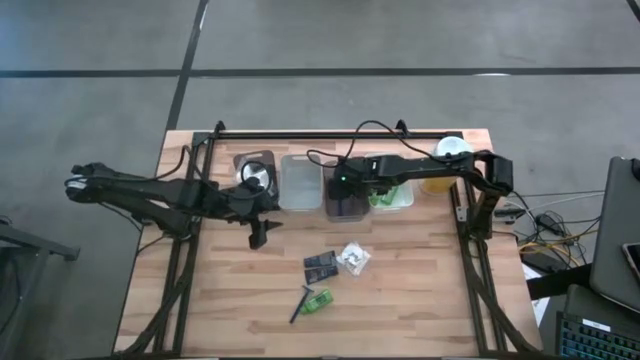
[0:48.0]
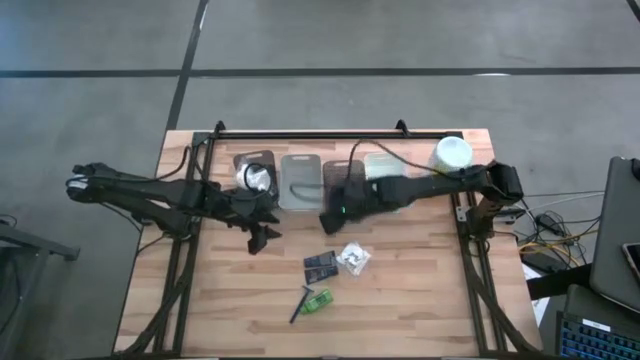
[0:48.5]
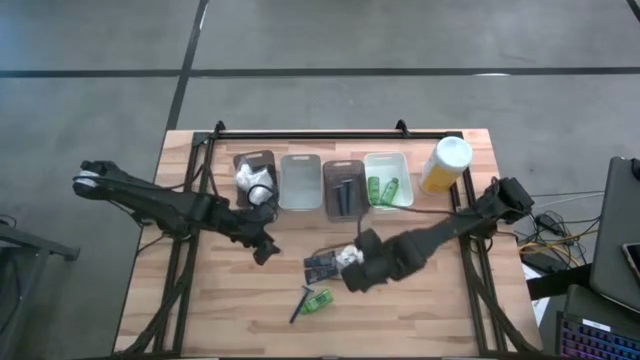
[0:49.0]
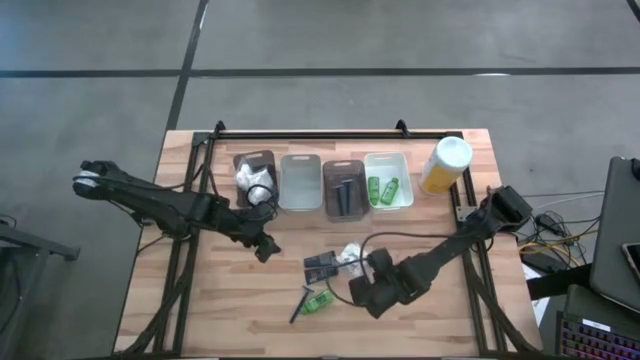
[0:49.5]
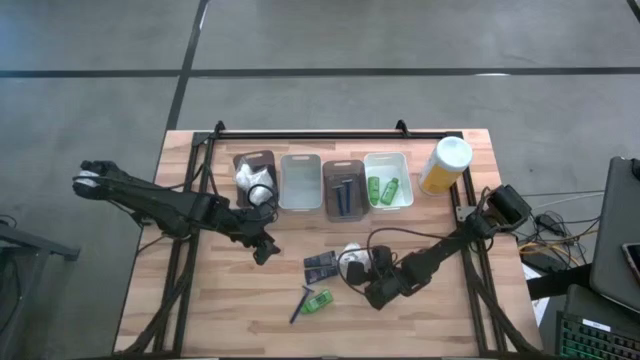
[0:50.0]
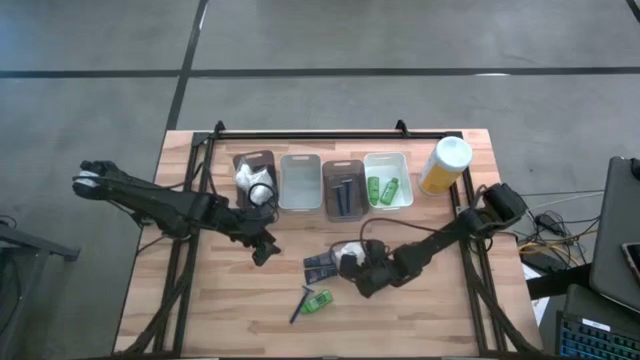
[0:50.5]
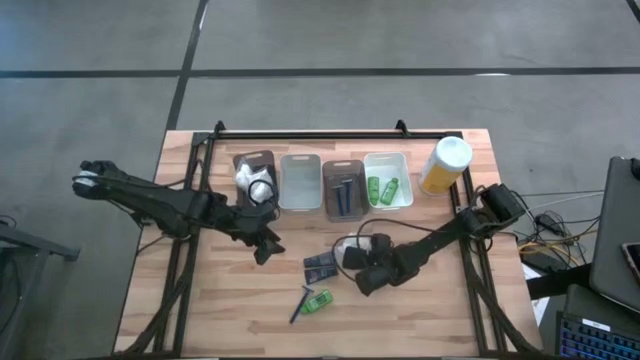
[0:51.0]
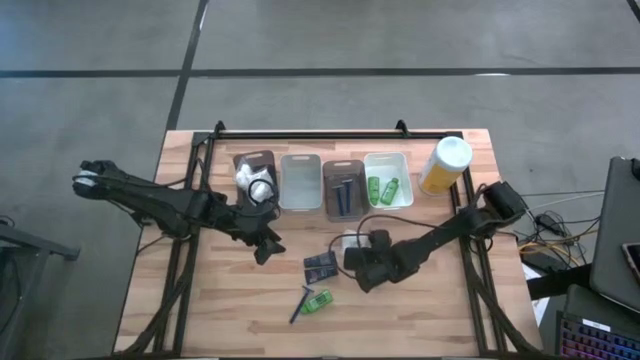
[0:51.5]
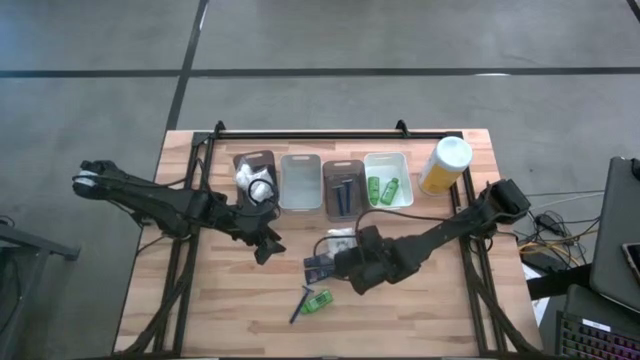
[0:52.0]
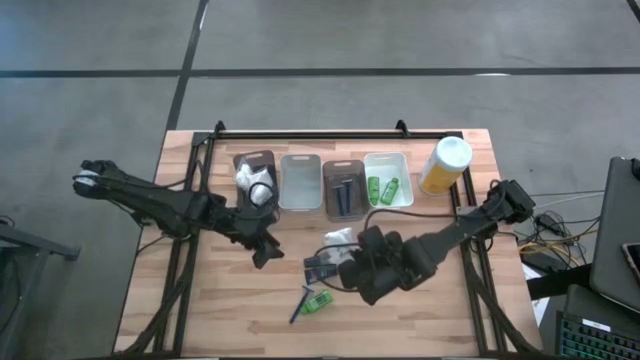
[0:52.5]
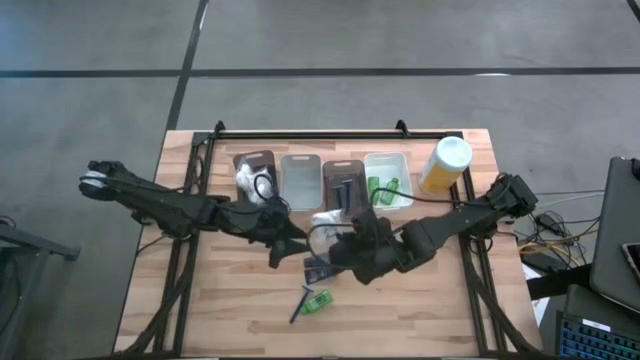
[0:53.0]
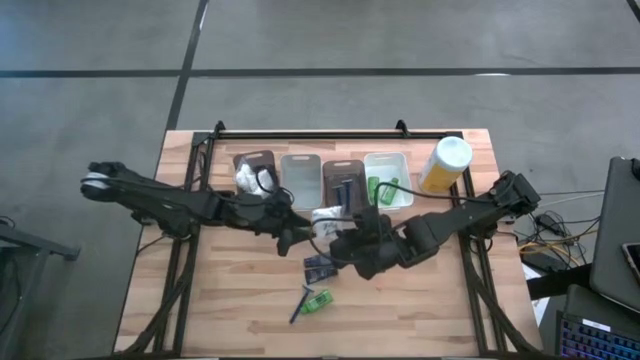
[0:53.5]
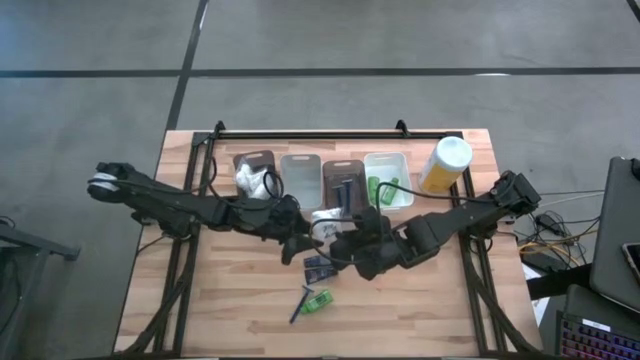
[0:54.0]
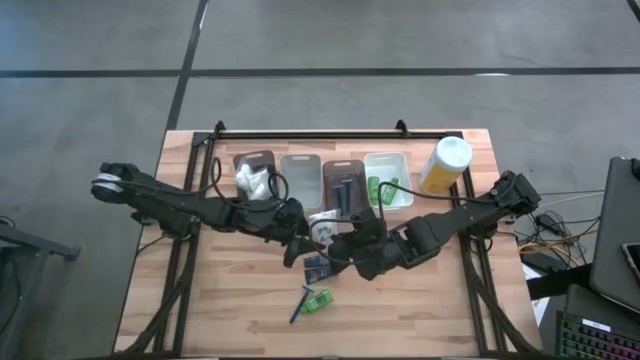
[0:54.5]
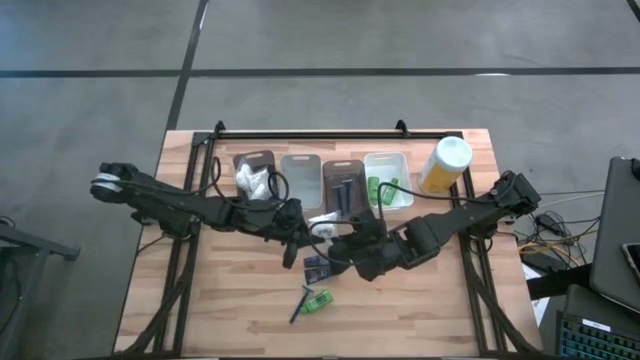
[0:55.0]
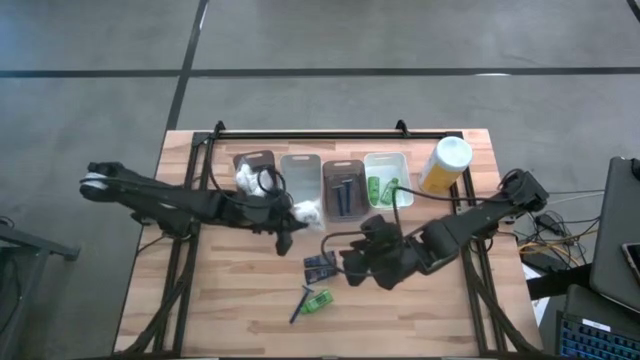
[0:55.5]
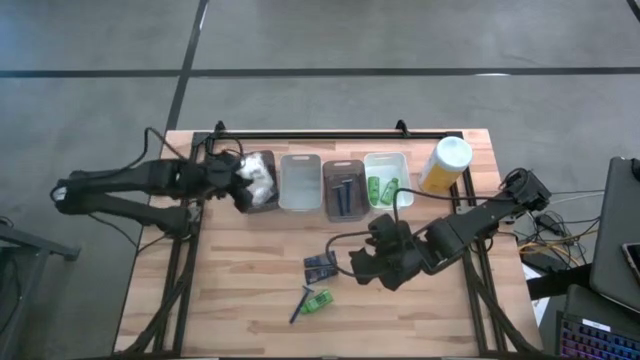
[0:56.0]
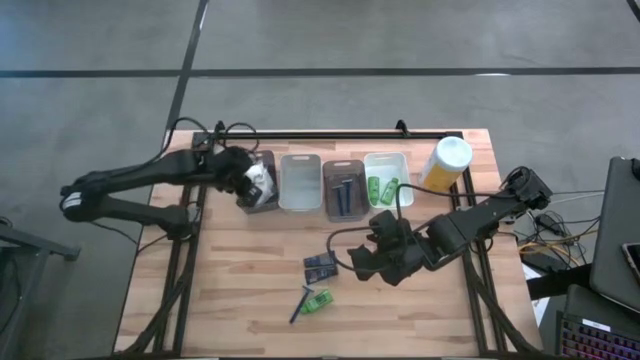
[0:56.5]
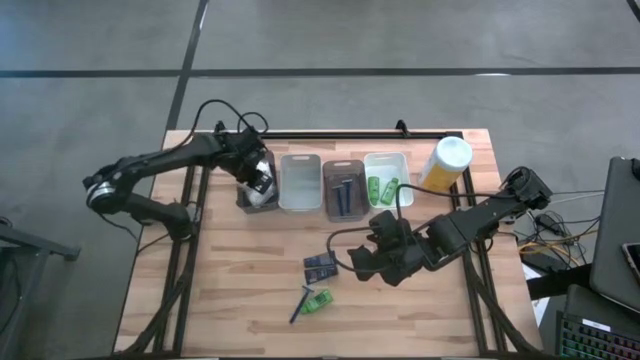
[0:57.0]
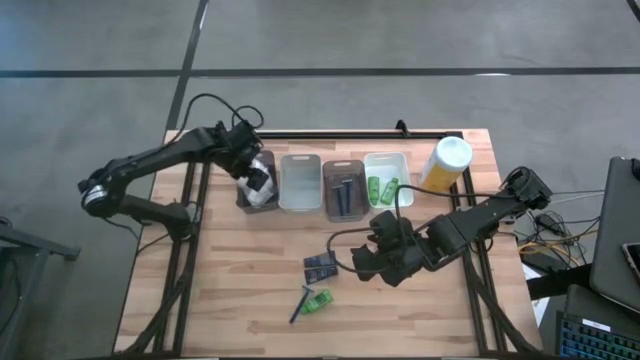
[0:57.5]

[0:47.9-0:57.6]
Task: Pick & Place Travel size toiletries
Put the white cotton pack into the left black bin

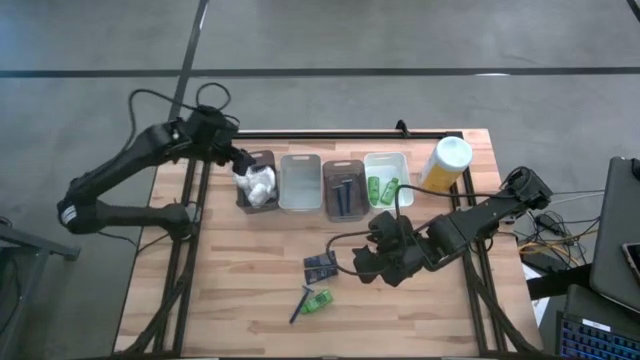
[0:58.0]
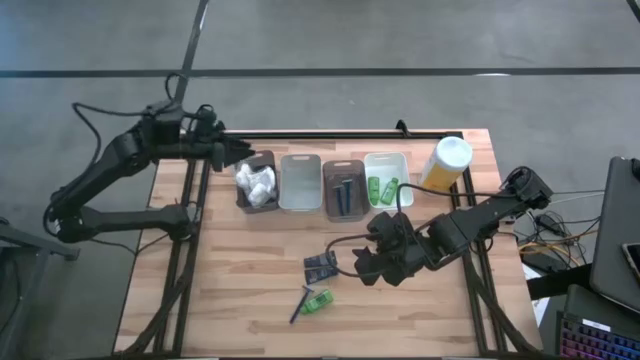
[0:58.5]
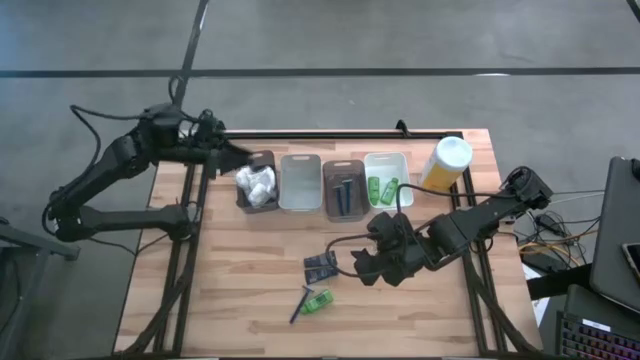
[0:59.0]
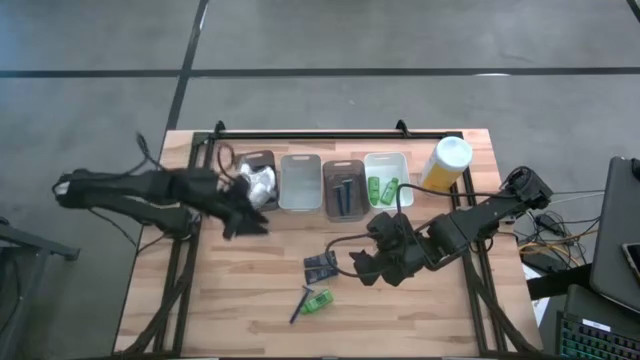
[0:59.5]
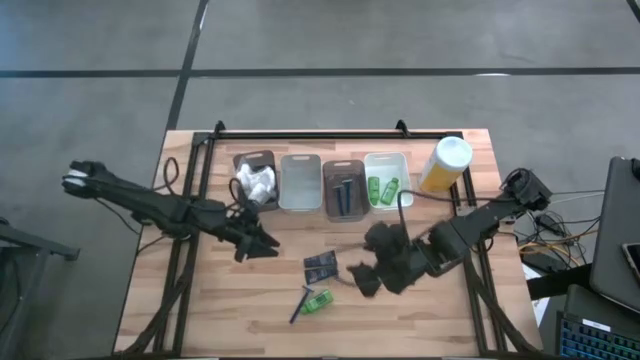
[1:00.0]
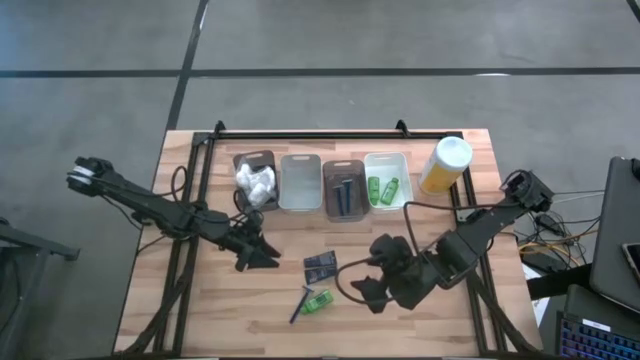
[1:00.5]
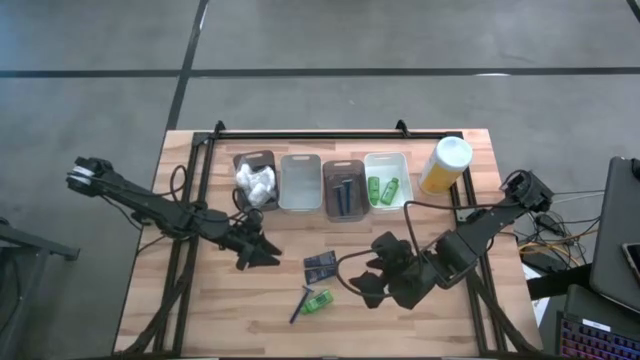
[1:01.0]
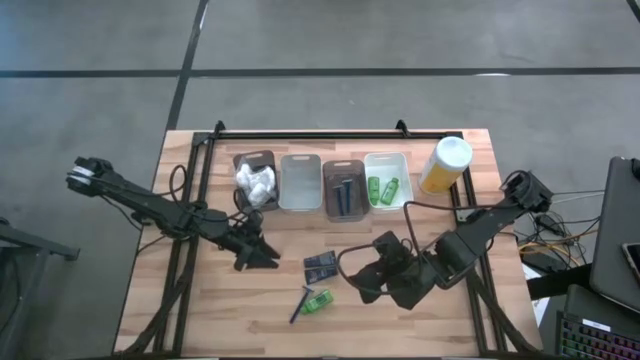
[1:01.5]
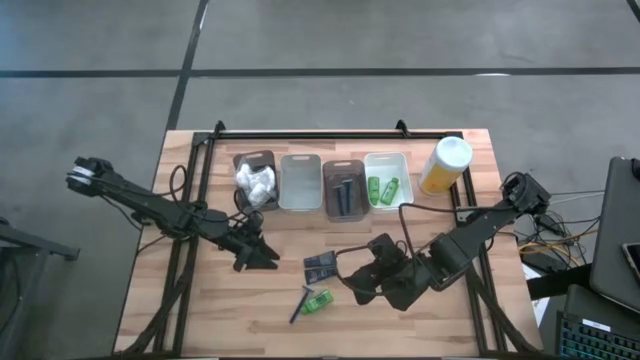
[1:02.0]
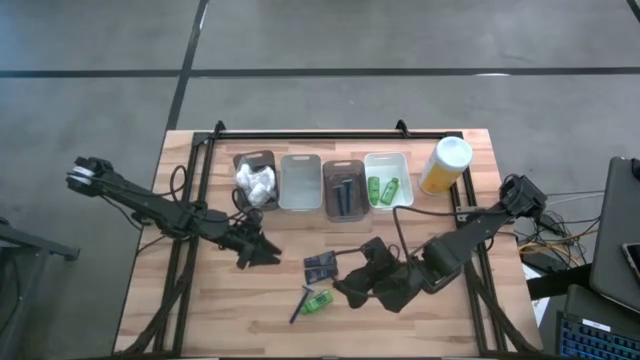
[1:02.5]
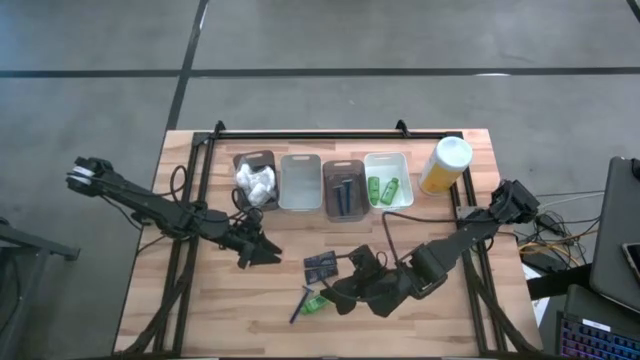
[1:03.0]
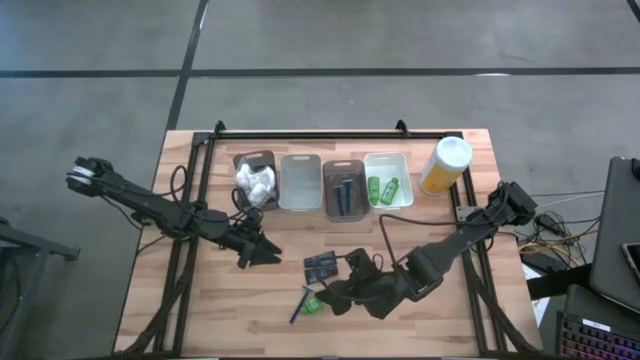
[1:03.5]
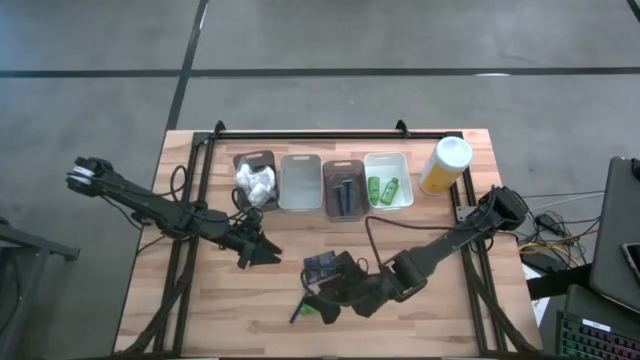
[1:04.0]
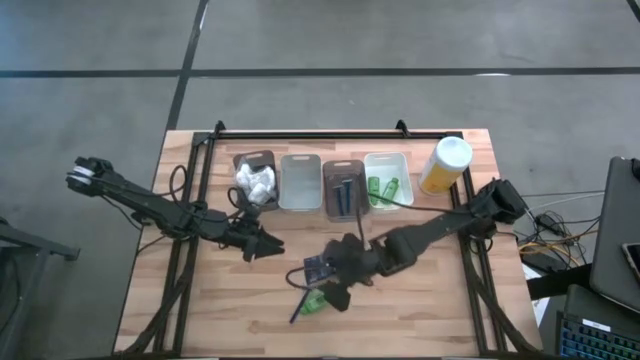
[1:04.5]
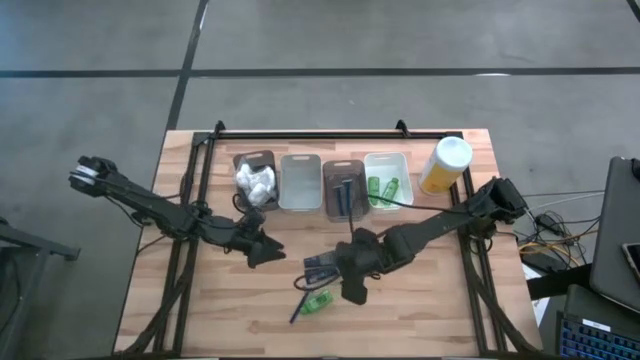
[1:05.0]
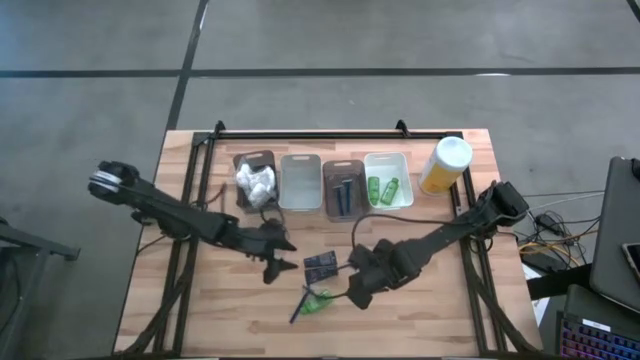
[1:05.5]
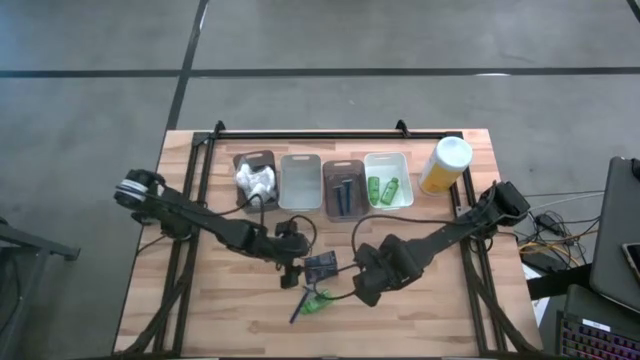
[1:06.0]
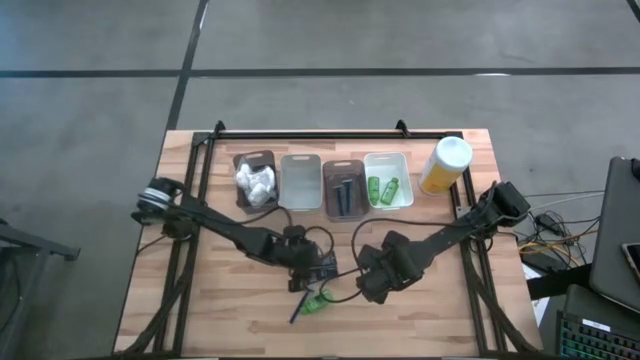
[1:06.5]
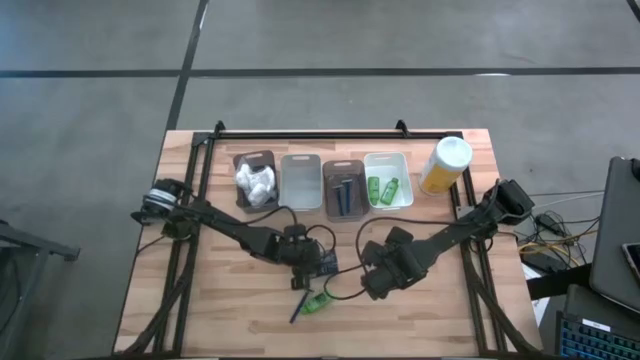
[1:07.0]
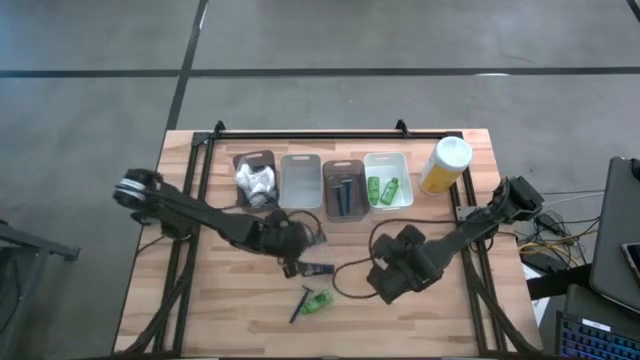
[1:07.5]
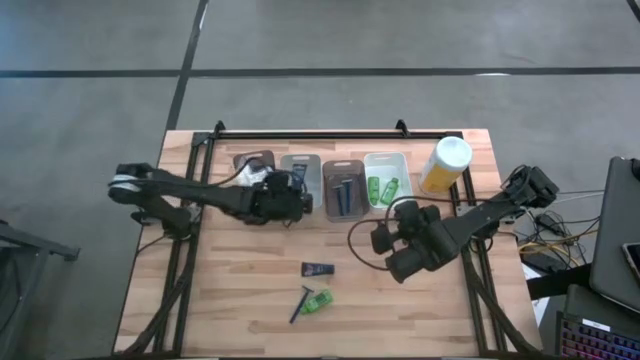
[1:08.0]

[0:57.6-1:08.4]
Put the blue shave cream into the gray bin

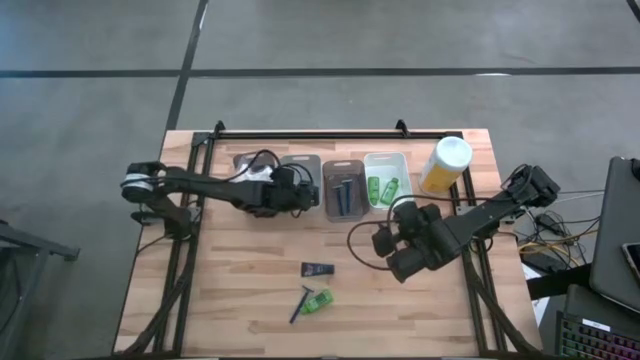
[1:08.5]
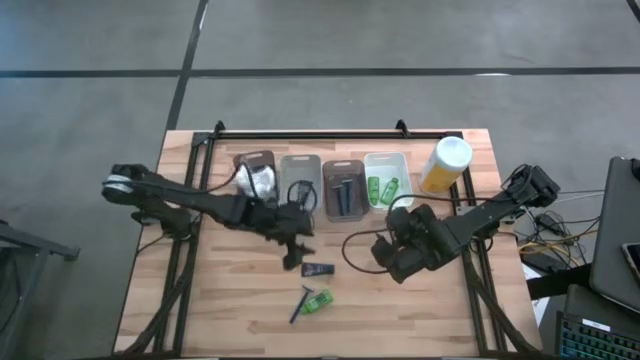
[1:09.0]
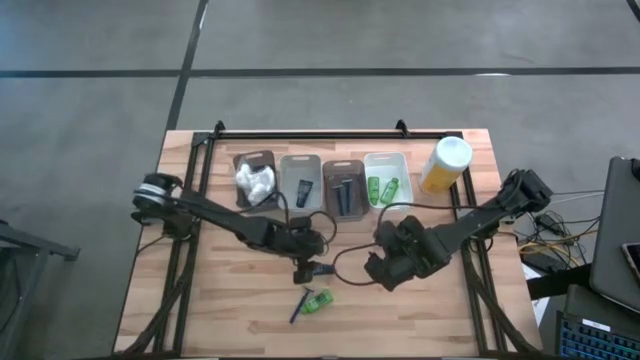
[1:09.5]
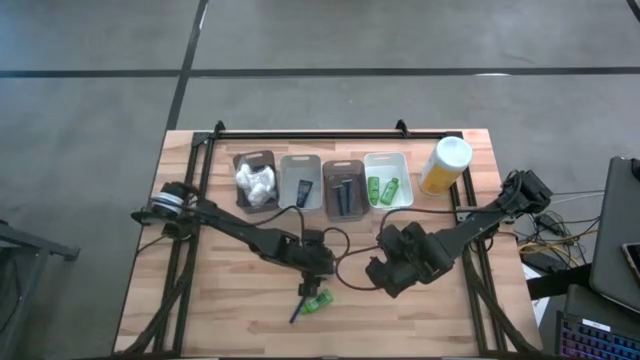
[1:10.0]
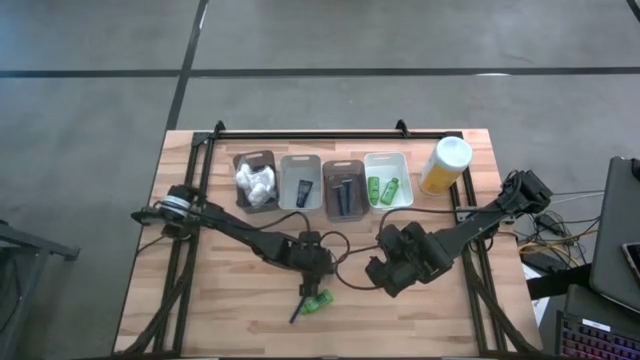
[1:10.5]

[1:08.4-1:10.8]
Put the blue shave cream into the gray bin
